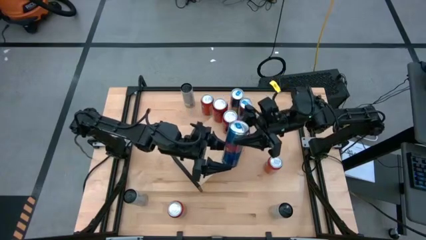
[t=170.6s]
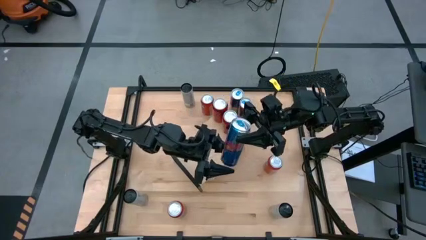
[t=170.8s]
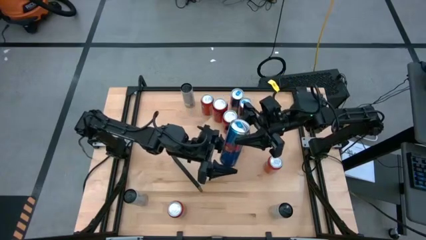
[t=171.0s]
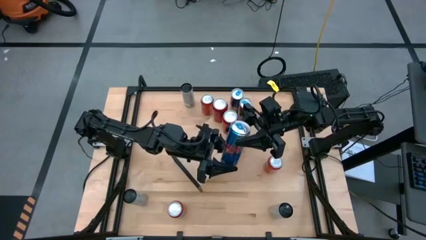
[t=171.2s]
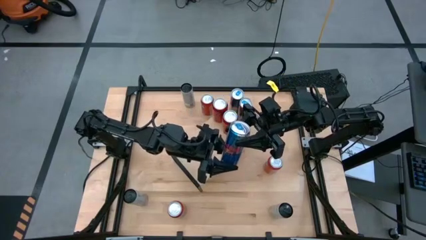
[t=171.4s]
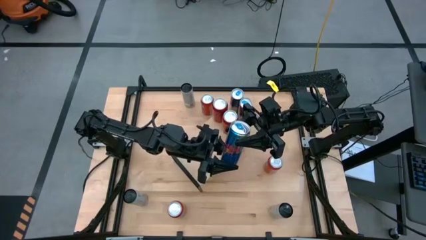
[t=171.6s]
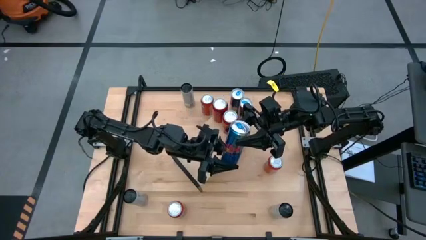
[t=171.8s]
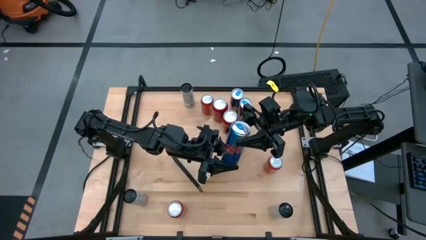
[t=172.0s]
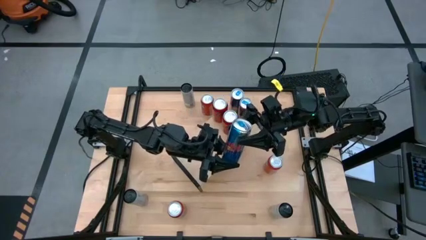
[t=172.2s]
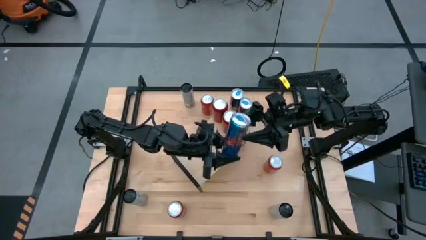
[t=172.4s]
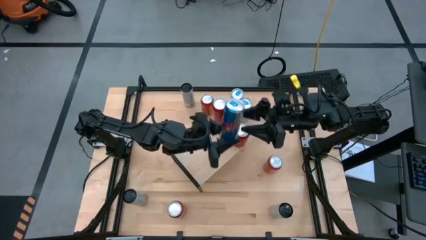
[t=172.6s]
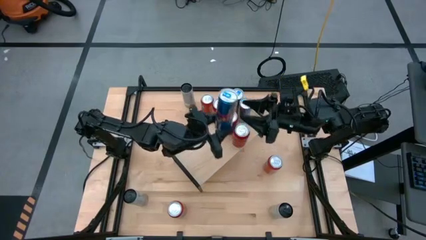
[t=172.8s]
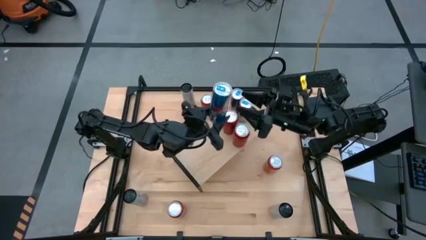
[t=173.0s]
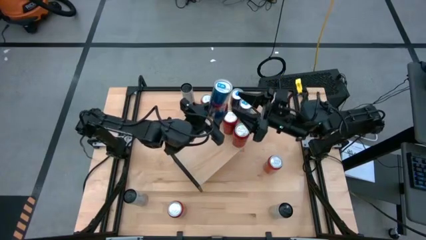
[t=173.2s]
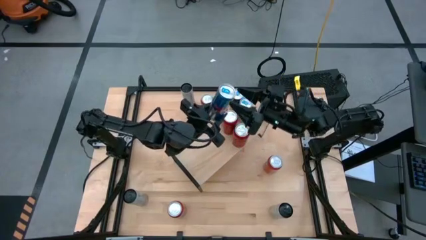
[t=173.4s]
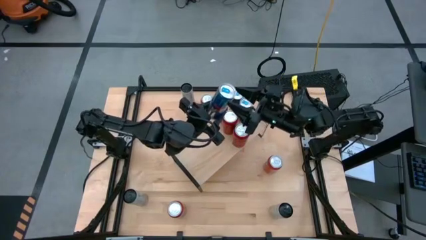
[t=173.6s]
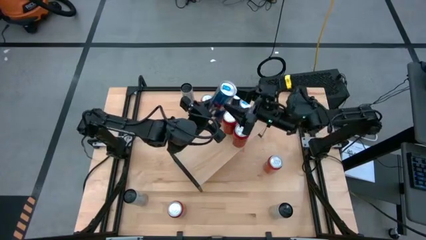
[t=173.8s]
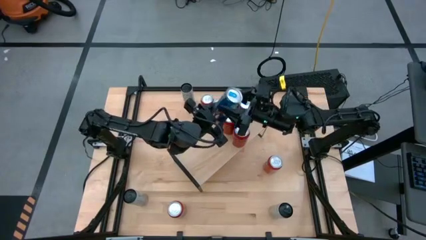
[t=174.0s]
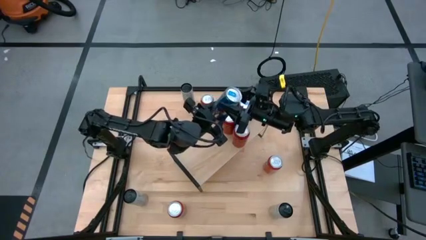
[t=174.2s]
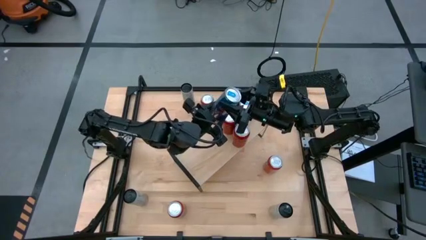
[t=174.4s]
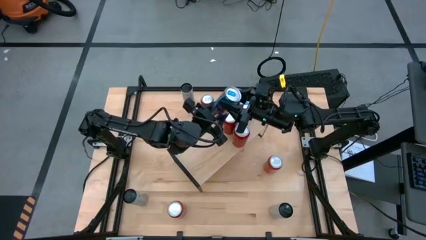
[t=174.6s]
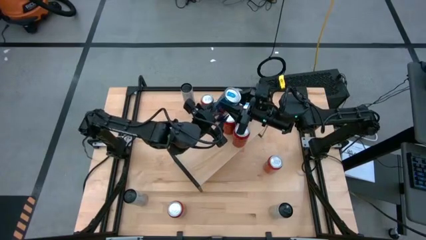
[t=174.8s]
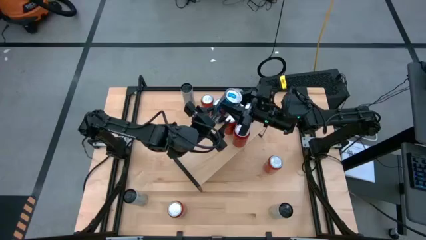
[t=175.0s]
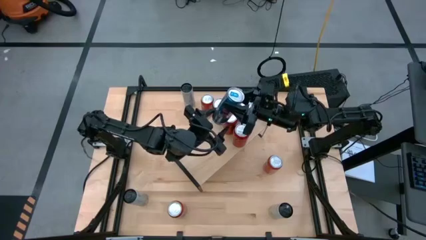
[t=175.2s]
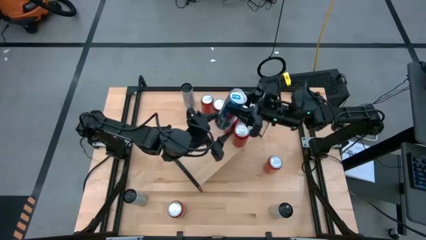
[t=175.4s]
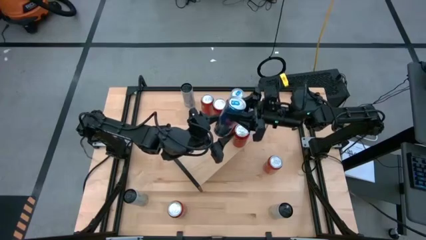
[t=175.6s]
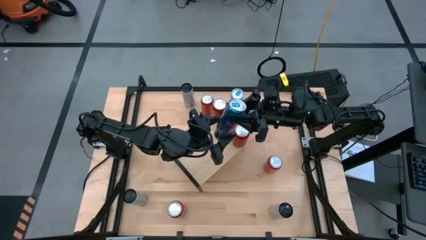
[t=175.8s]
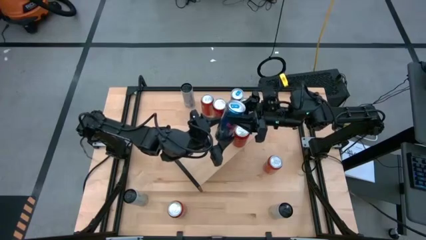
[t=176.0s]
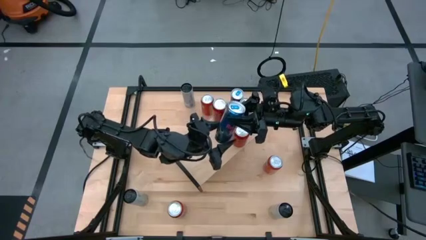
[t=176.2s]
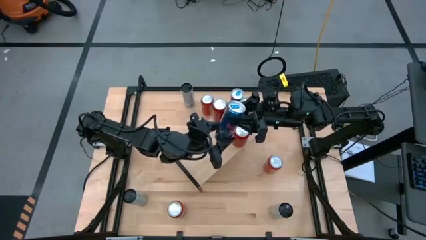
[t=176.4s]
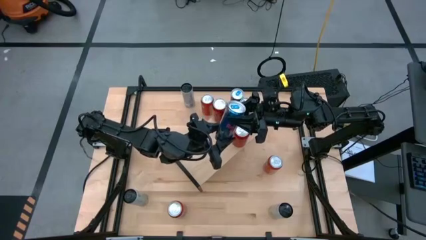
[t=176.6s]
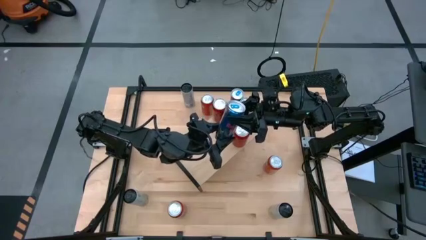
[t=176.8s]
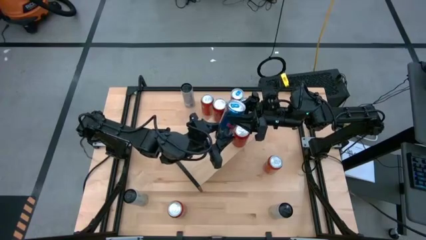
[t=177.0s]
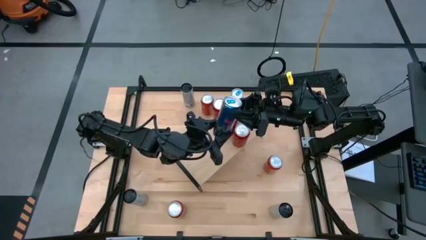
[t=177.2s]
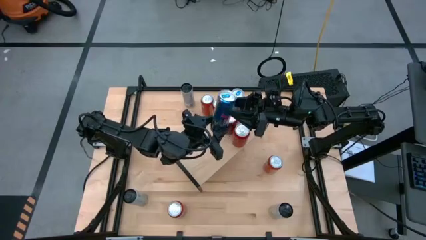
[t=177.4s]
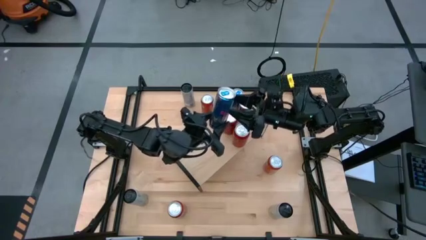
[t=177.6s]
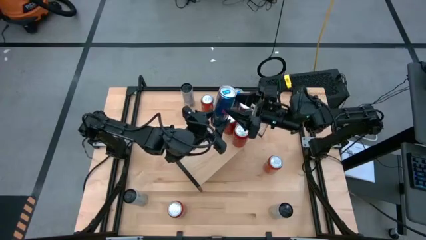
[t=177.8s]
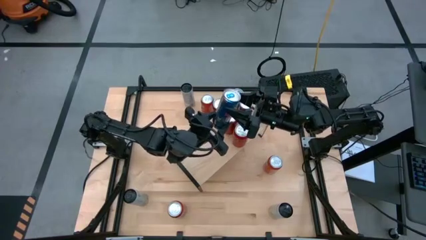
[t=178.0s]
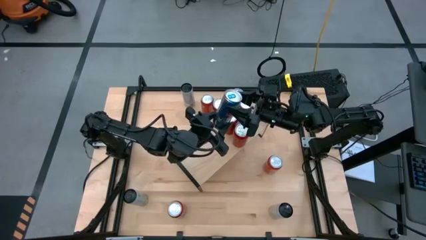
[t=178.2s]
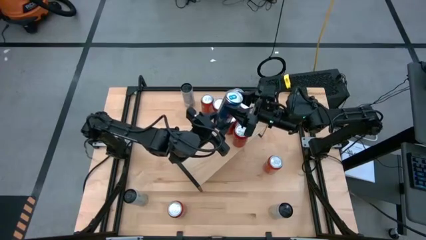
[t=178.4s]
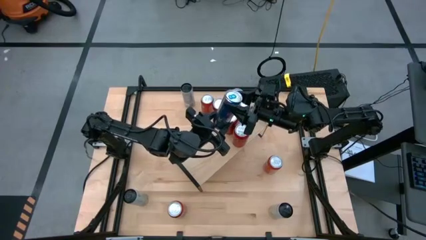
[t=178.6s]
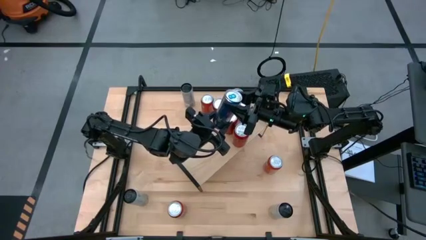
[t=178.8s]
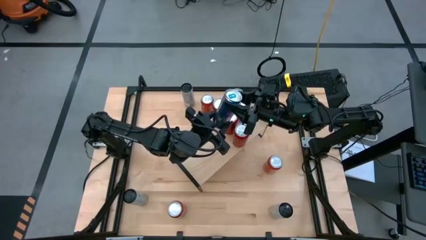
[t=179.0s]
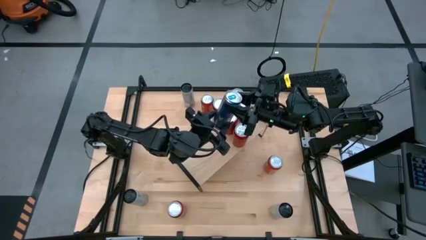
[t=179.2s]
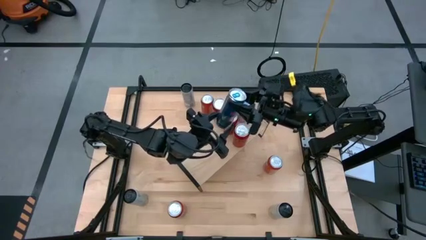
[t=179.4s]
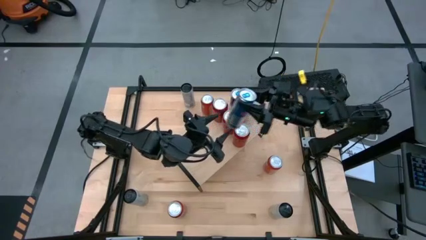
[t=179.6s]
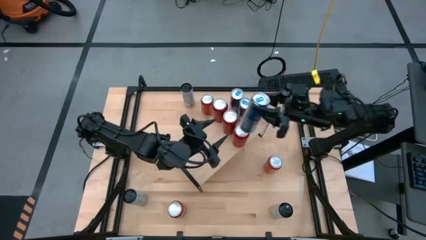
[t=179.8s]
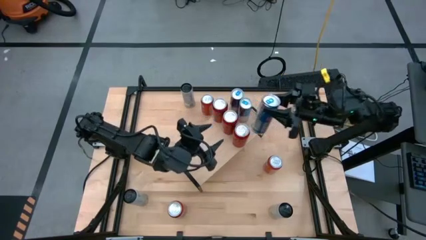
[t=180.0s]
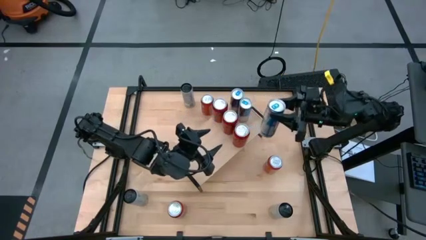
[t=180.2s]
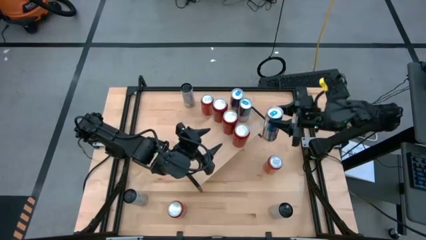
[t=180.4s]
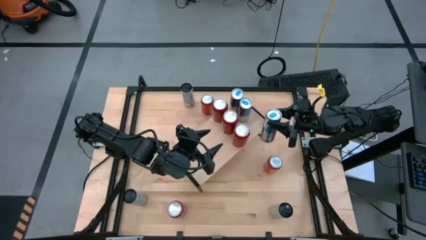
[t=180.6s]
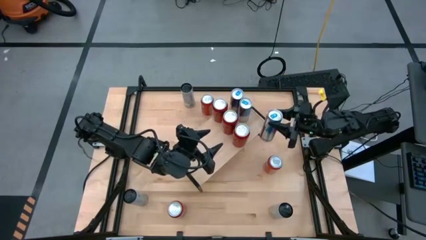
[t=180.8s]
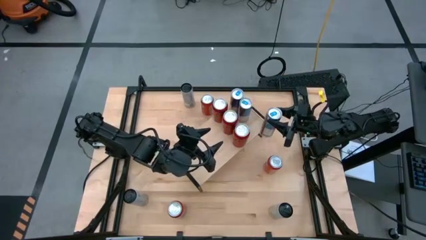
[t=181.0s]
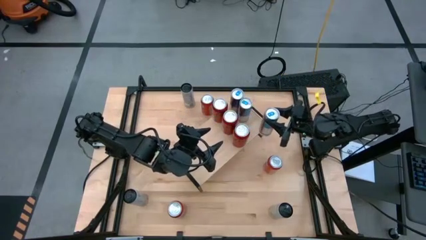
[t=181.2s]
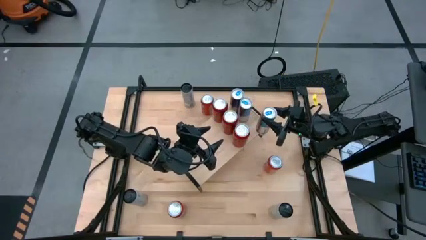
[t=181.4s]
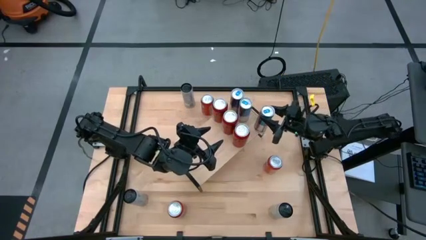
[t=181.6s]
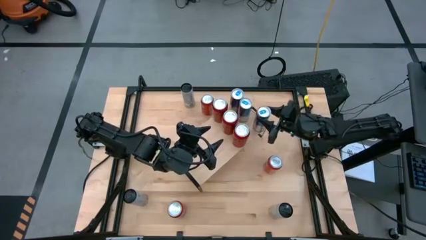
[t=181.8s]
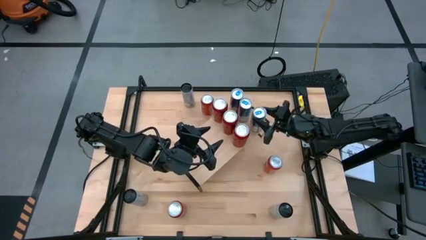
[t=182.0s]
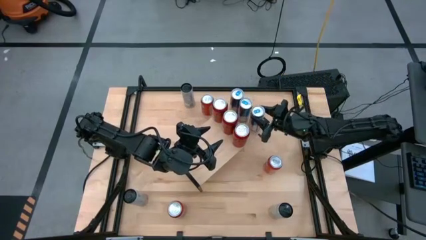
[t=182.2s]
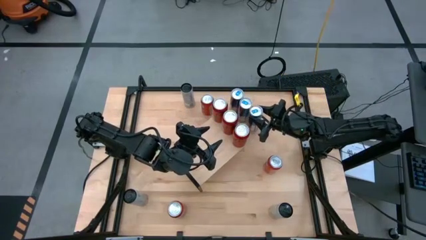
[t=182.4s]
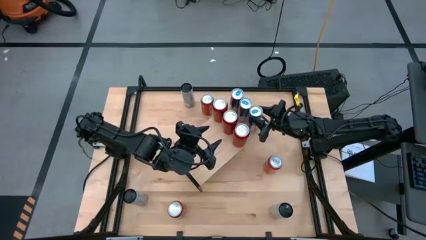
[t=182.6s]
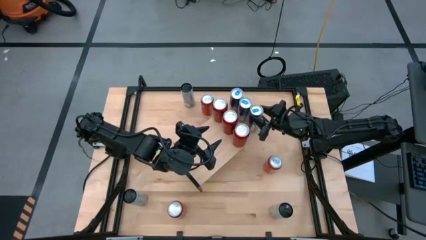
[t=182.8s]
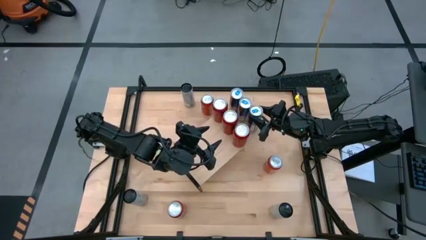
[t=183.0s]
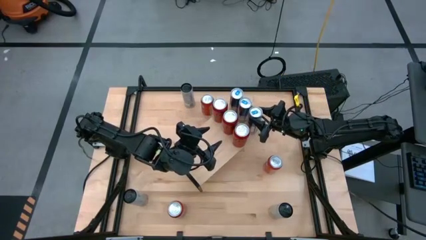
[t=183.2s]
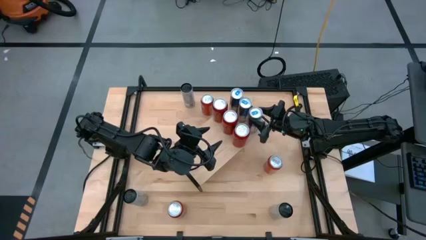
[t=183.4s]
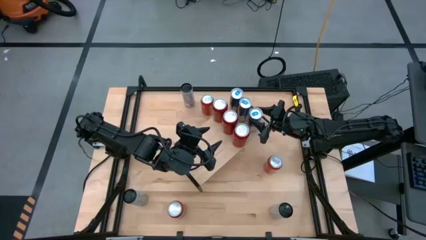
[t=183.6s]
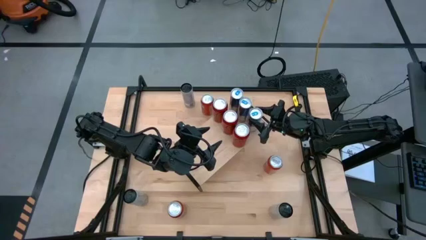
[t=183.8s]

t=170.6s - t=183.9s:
Task: Place canned beverage on shelf
Put the blue soda can on the shelf

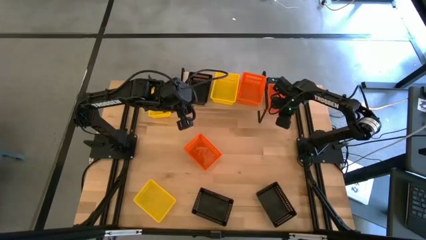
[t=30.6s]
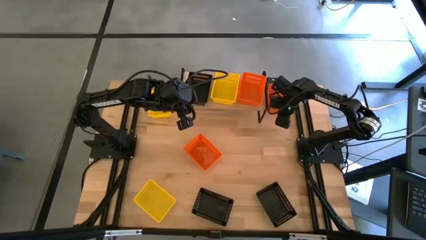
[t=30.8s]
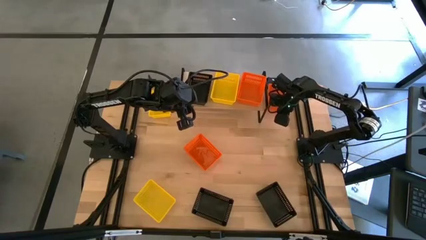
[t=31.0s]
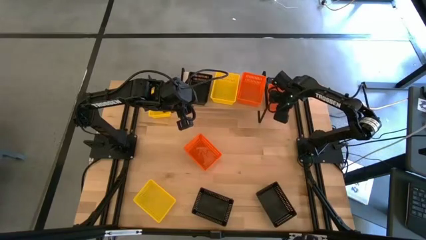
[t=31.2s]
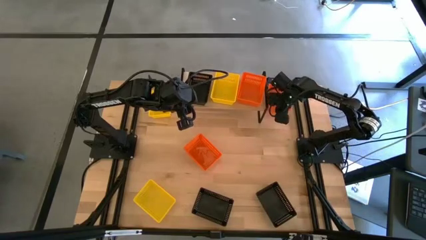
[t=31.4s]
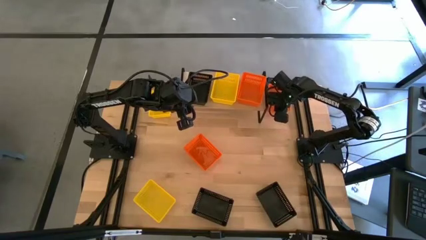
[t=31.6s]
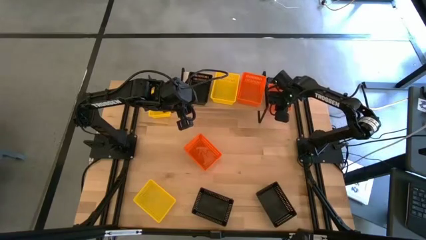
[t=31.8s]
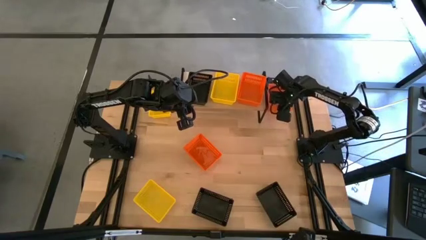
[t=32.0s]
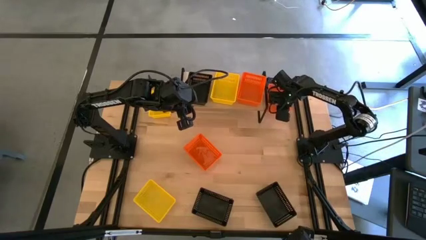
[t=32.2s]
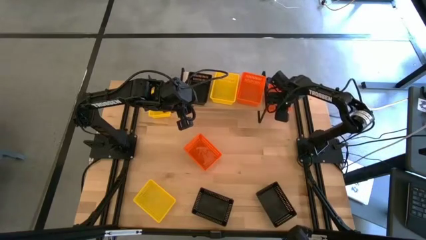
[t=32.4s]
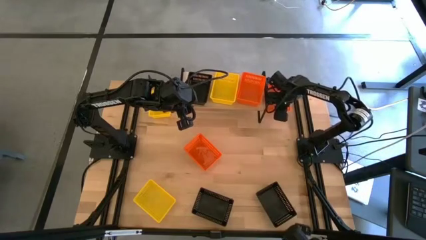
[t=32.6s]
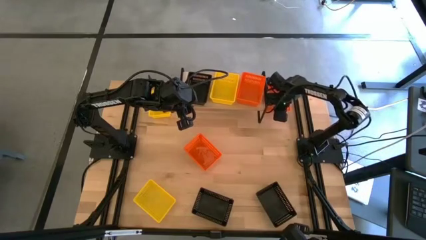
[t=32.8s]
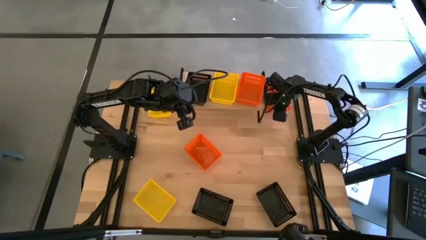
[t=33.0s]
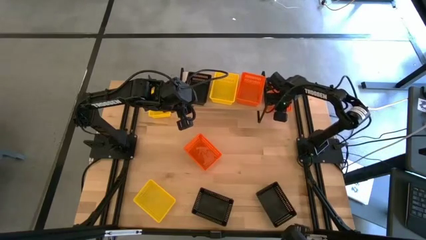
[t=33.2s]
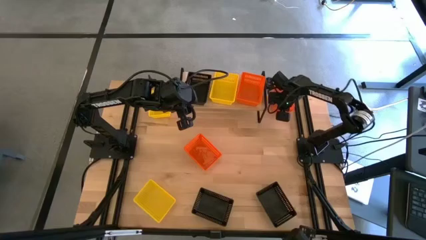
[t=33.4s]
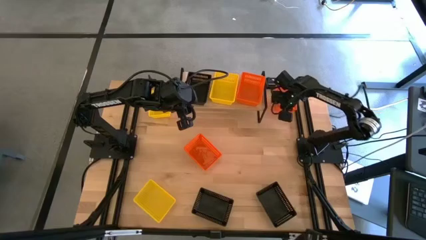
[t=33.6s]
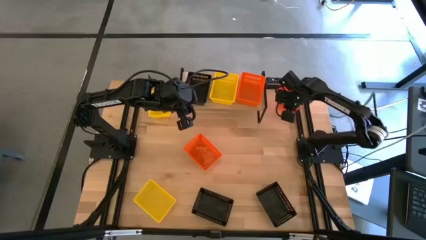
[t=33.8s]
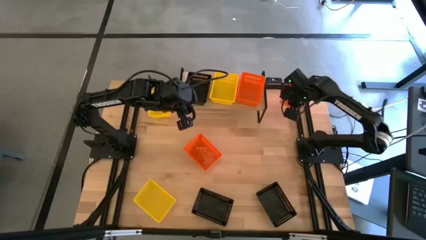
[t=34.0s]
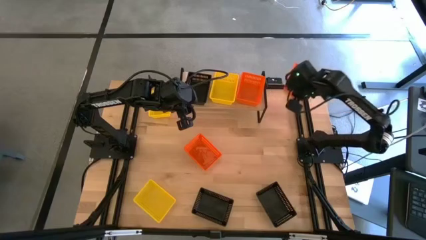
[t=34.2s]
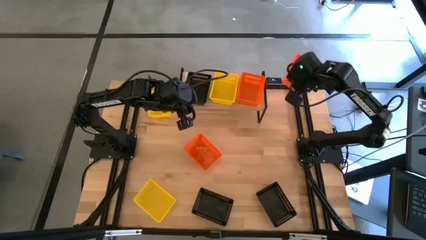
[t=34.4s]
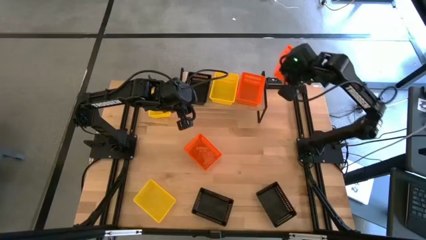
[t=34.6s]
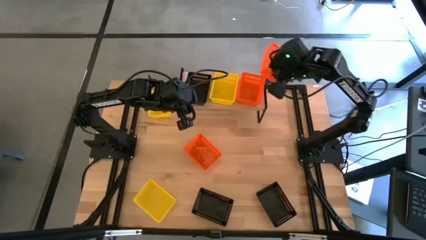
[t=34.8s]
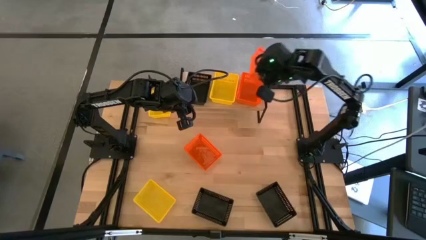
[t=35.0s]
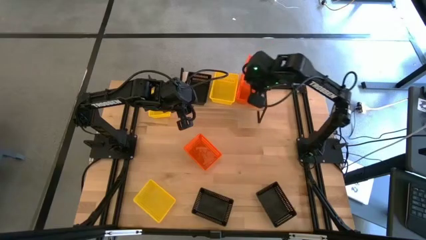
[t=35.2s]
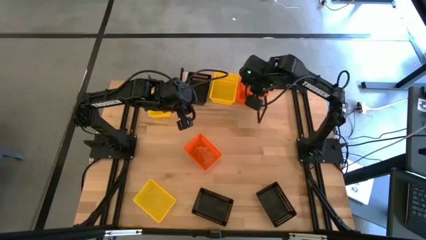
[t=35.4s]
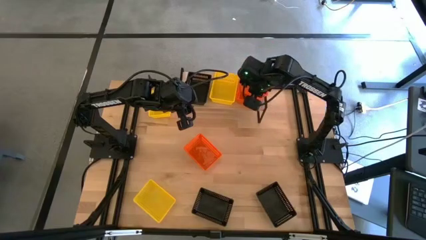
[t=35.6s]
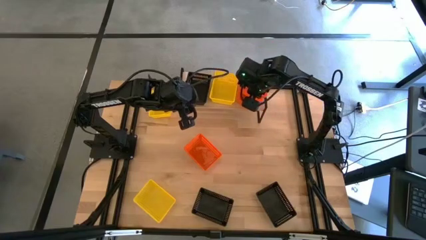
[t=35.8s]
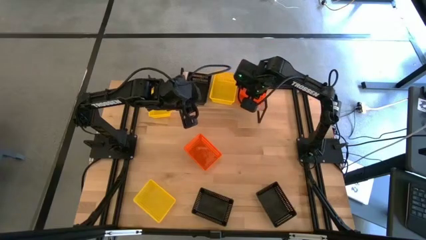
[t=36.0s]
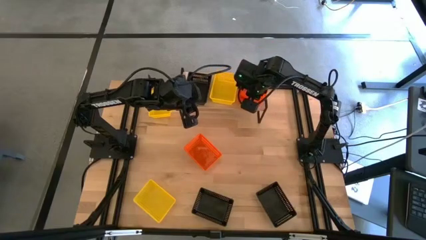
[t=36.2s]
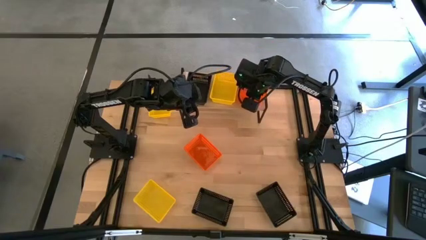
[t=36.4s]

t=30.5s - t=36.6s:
Task: Stack baskets on shelf by color
Stack the top orange basket on the orange basket on the shelf
